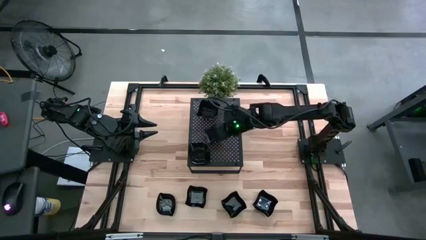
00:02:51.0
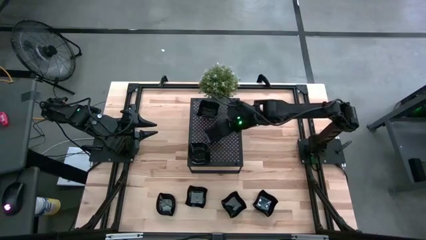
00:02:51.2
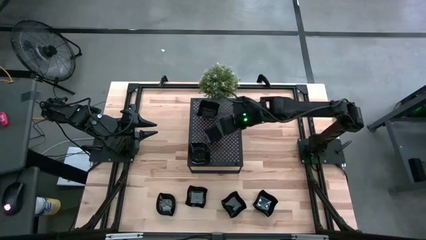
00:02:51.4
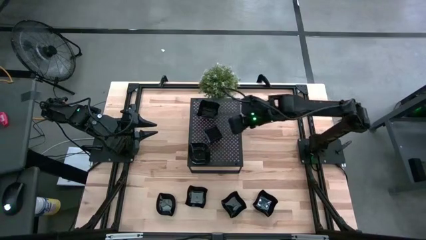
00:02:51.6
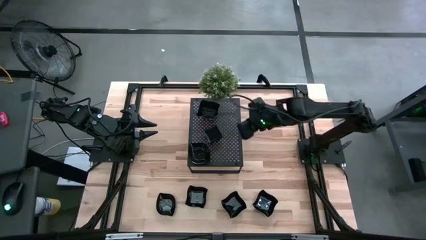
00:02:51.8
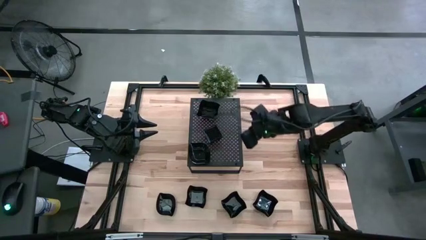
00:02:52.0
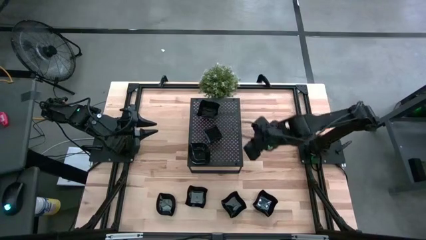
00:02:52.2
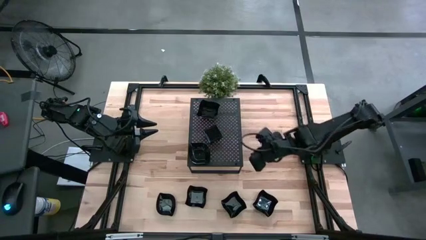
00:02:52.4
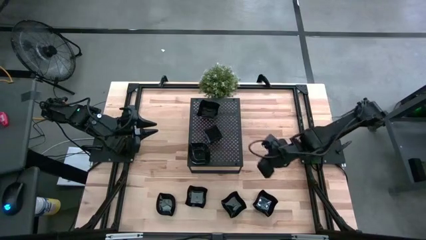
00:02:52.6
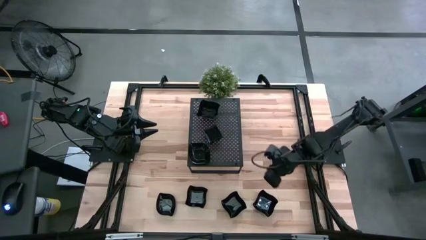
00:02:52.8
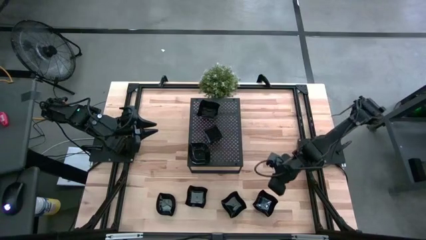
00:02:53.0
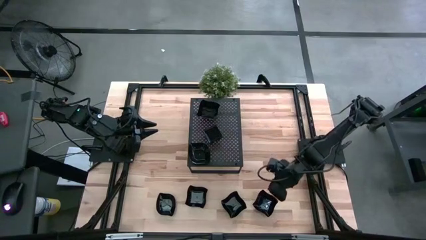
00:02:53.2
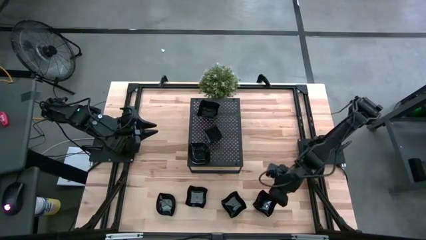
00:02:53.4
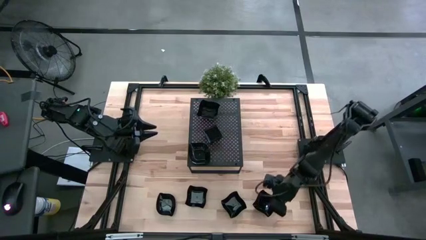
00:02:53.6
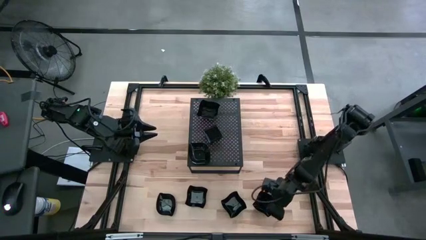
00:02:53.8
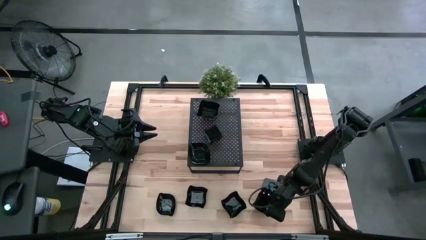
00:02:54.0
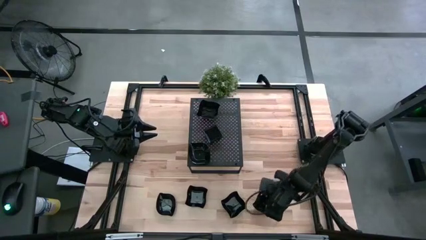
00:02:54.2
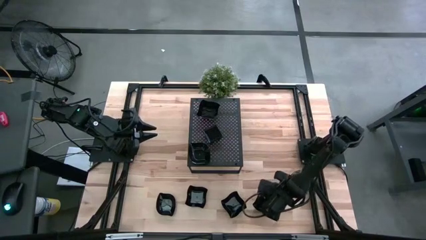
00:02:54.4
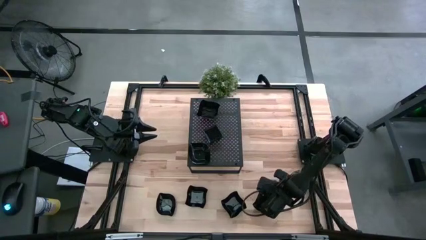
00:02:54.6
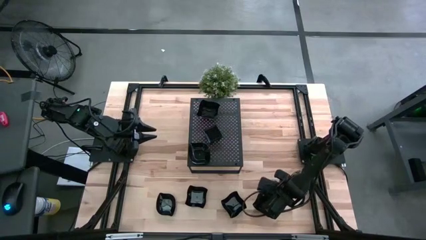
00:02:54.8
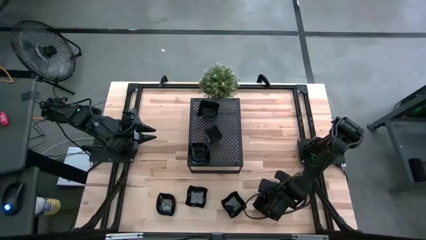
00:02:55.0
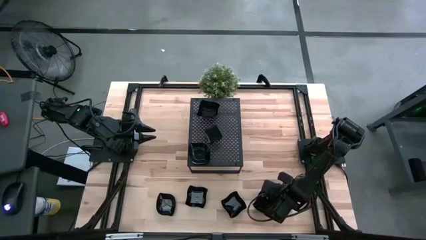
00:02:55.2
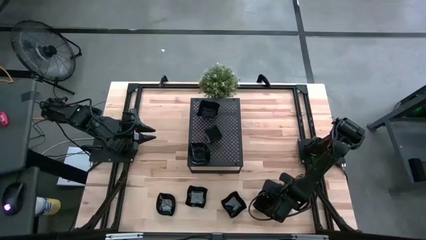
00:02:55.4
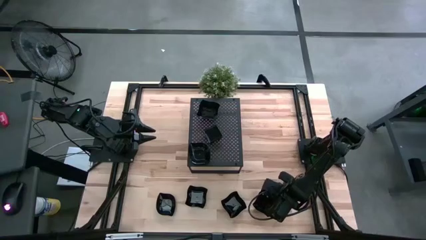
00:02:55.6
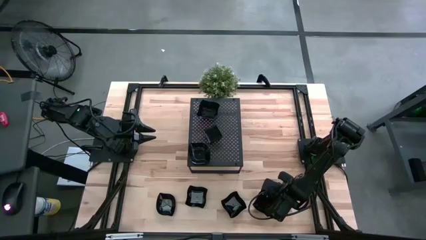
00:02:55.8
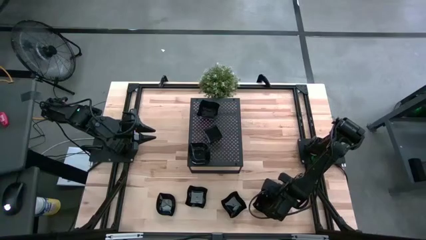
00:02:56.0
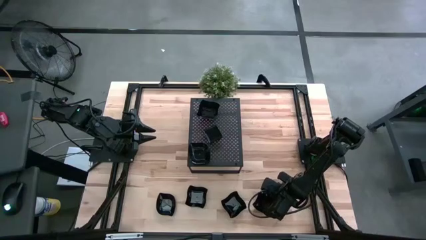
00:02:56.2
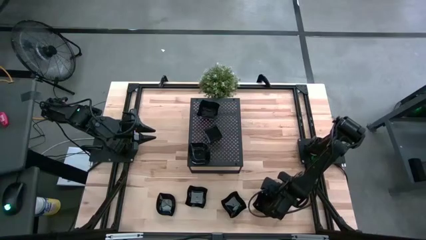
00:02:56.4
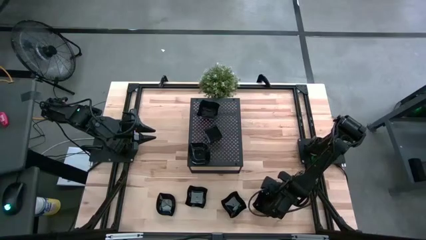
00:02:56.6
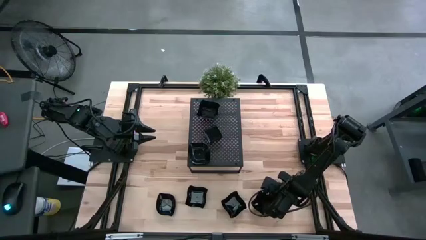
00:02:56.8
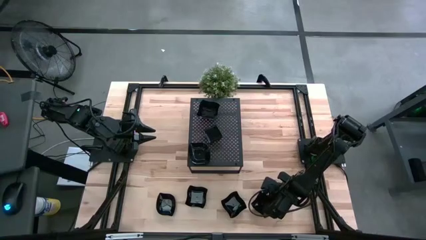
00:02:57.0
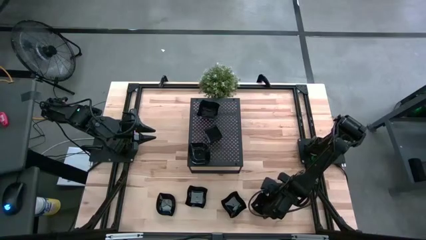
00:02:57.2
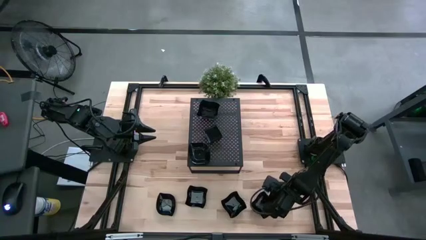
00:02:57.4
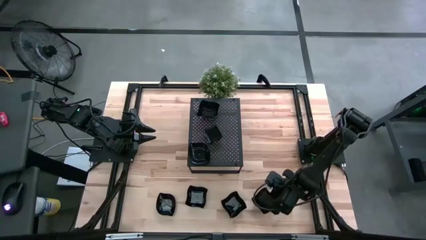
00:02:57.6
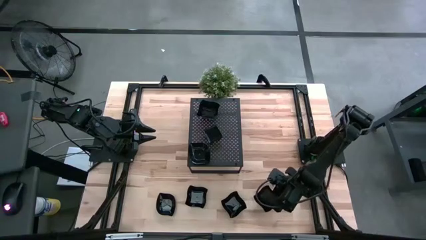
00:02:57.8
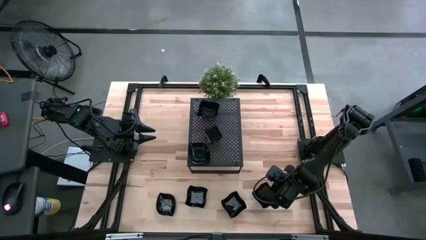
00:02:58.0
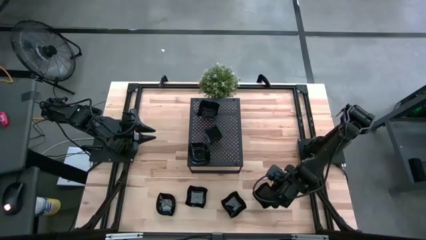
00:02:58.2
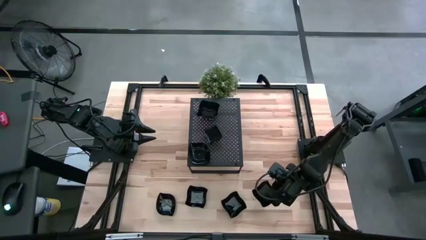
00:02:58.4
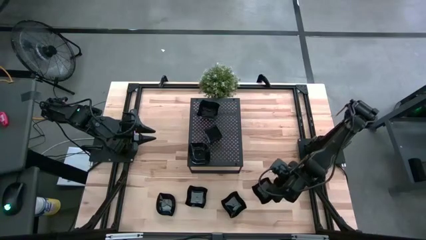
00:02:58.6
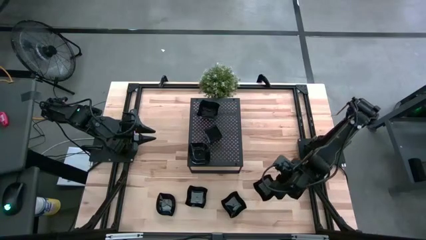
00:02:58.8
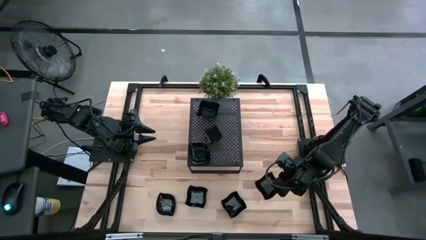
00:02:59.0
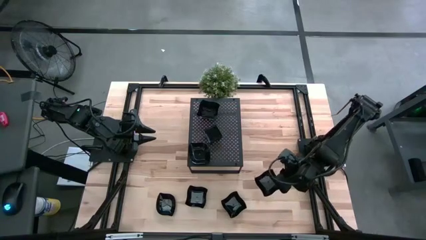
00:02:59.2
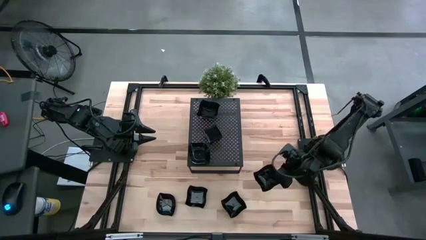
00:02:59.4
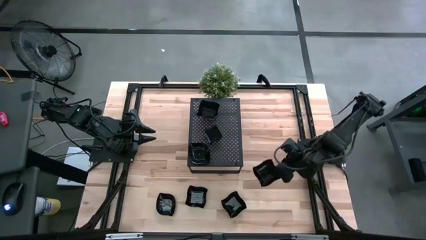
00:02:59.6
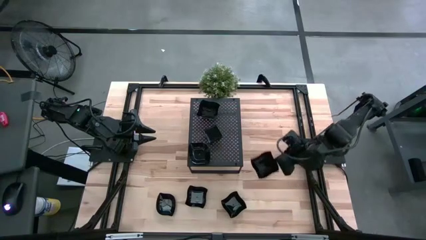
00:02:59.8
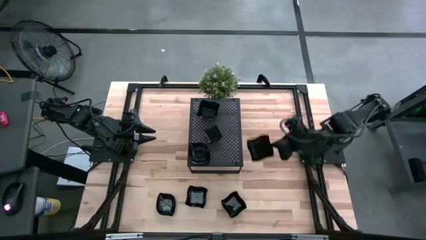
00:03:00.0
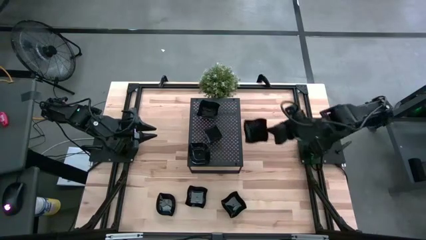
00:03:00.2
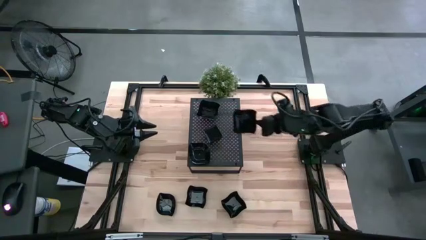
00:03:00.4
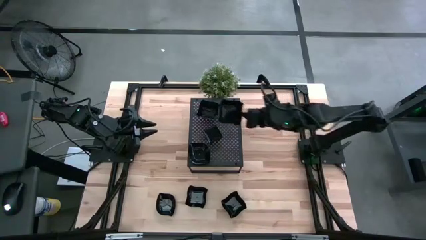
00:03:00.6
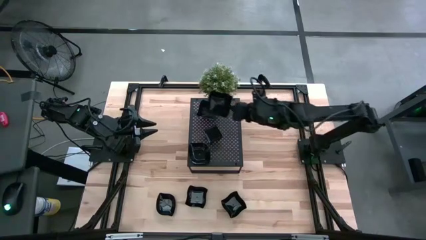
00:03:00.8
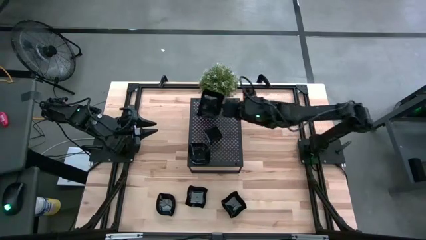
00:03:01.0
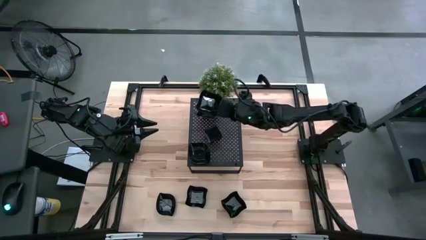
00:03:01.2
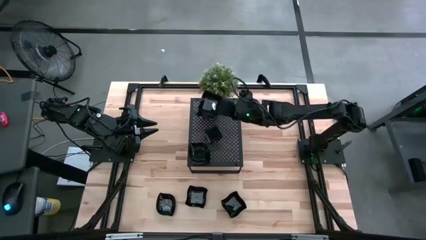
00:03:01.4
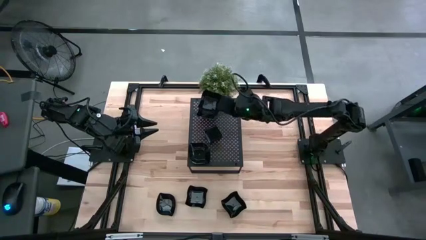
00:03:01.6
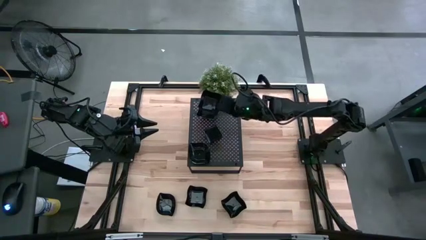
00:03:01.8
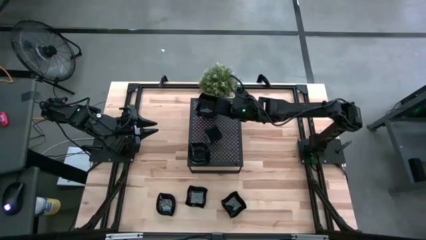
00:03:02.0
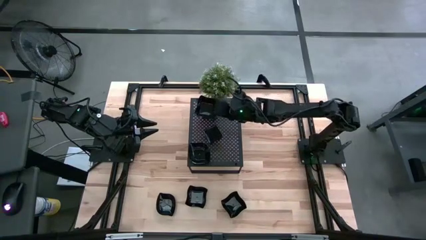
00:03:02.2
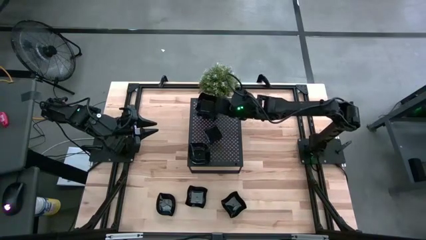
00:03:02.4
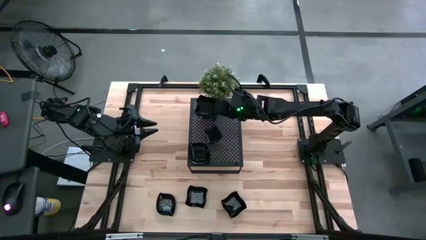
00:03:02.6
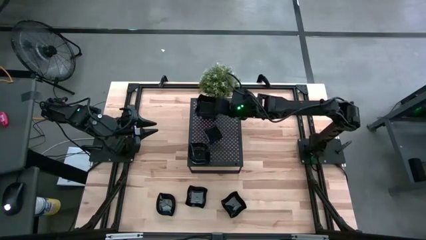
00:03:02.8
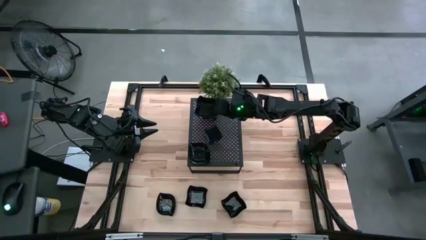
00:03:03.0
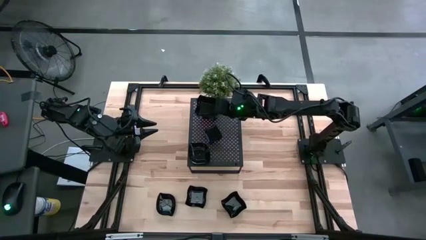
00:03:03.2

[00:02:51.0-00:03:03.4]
Task: Pick & Place Mini shaped plates
Stack the distorted square plate on top of the distorted square plates on the shelf
